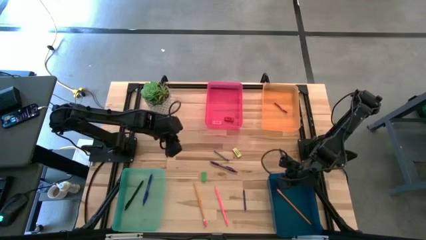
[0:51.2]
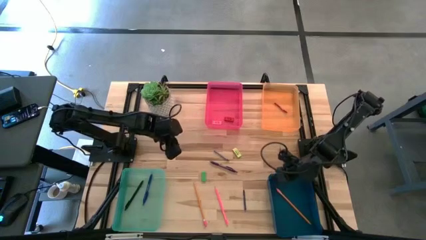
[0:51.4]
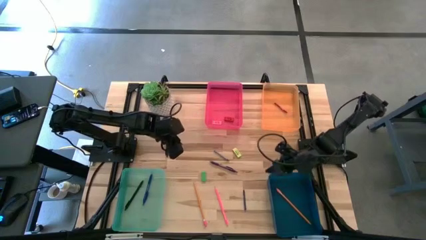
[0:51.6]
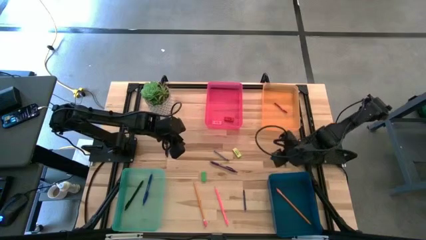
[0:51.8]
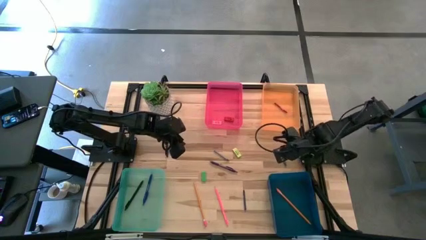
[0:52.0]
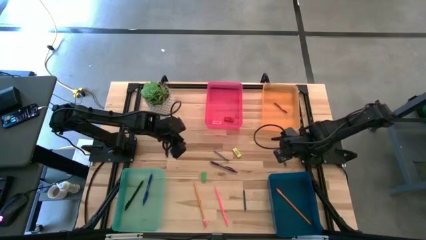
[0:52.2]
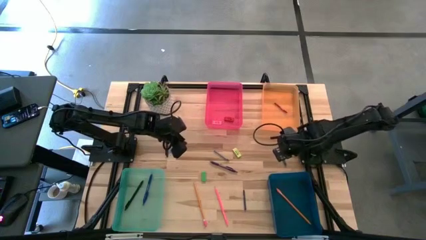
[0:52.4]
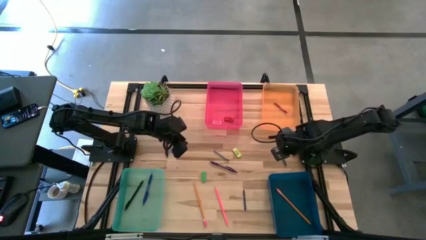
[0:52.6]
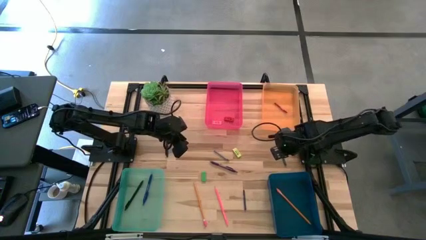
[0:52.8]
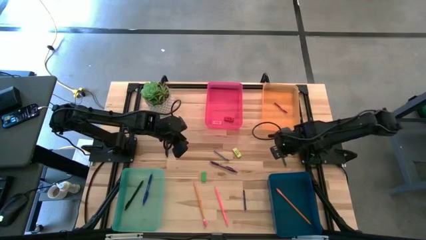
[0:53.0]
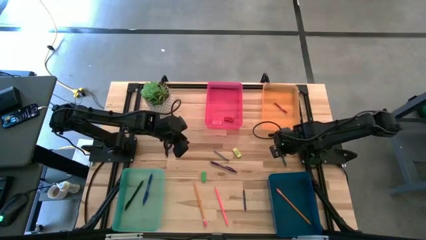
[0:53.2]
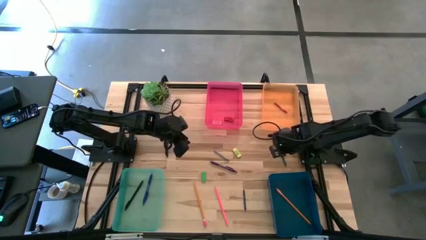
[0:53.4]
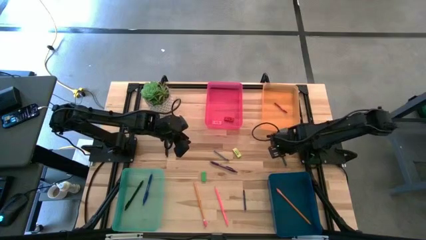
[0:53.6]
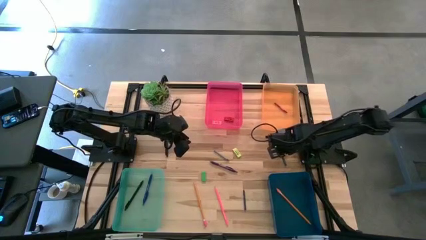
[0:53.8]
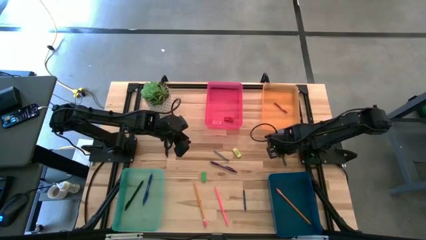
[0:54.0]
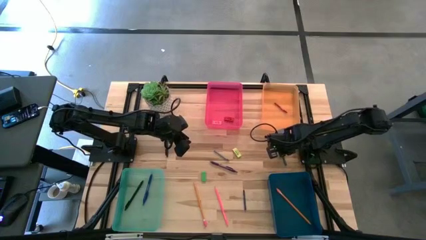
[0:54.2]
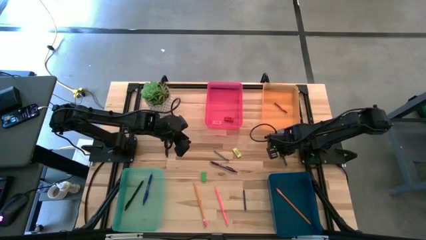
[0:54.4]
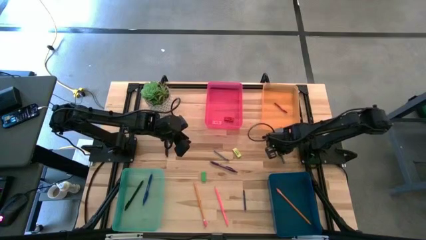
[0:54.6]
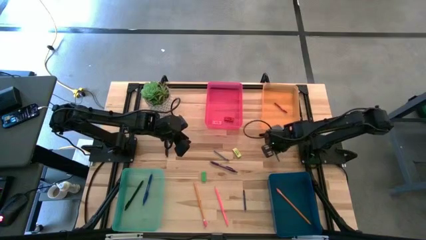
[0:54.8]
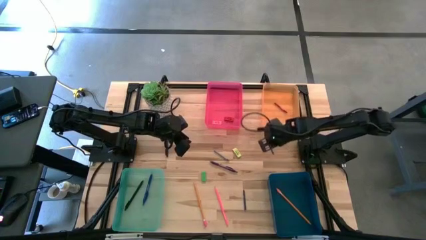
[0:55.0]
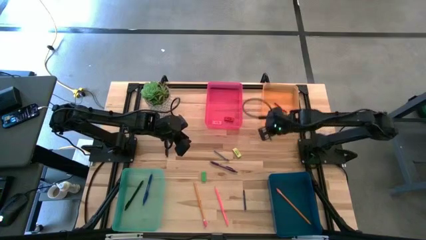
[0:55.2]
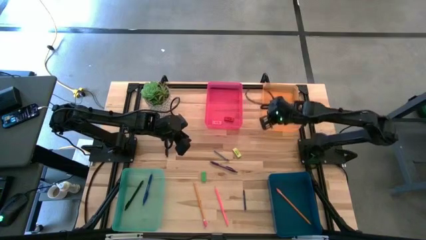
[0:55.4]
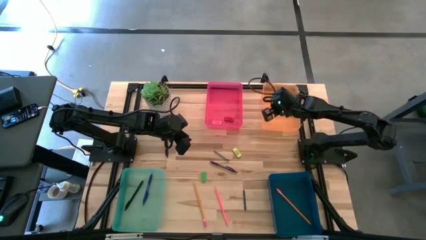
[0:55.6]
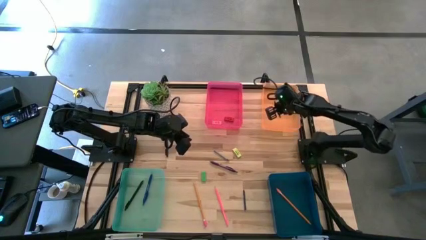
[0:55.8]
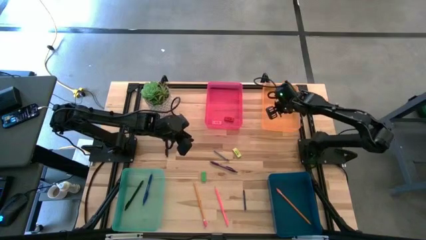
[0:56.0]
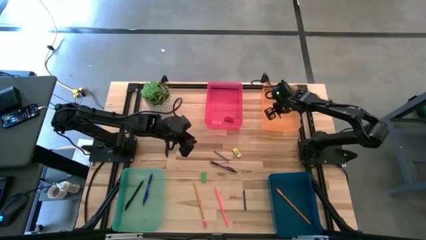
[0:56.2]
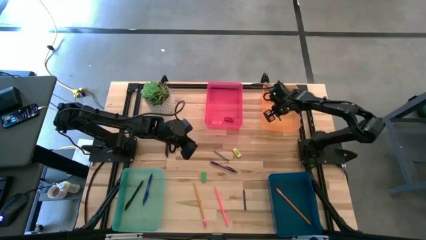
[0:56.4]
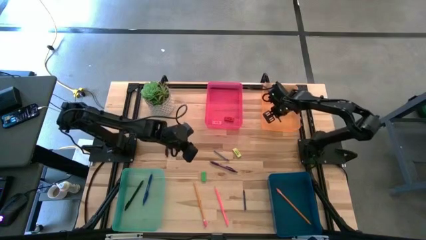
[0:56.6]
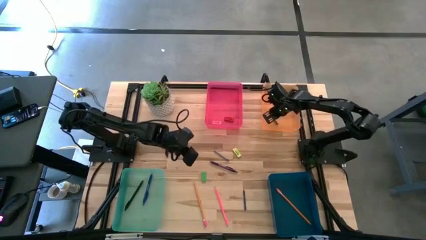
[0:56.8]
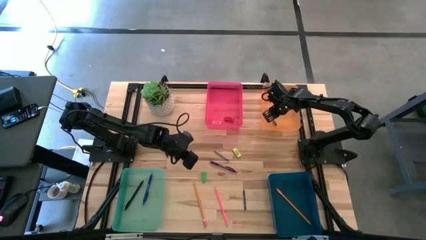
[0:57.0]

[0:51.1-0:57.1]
Task: Sort crayons/erasers/pens/pencils in bins
Put the green crayon into the orange bin

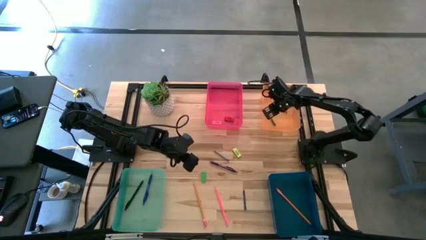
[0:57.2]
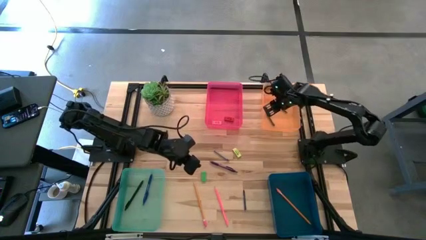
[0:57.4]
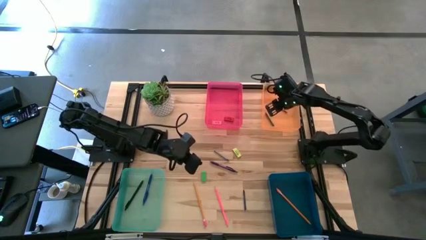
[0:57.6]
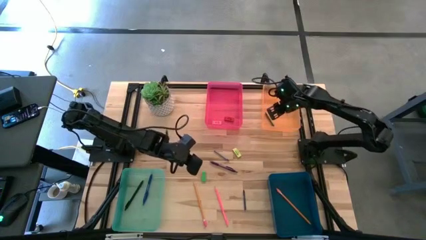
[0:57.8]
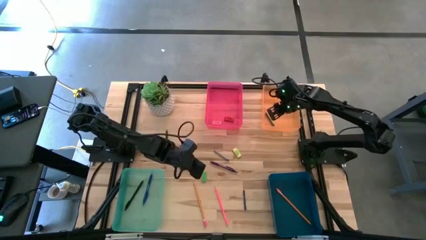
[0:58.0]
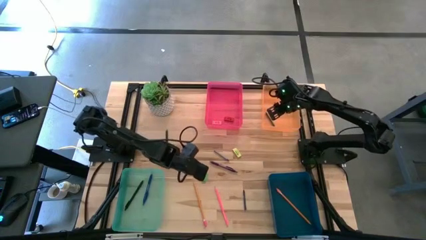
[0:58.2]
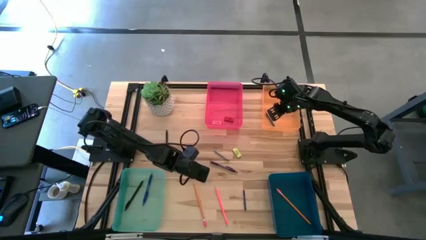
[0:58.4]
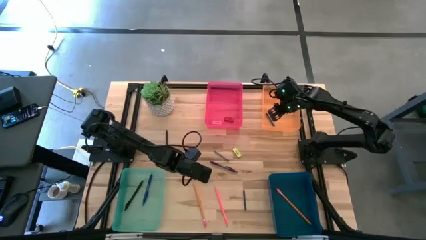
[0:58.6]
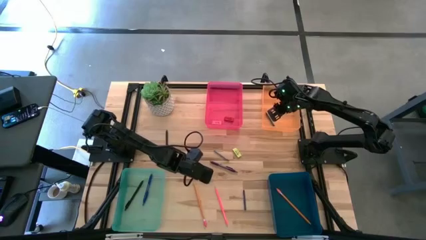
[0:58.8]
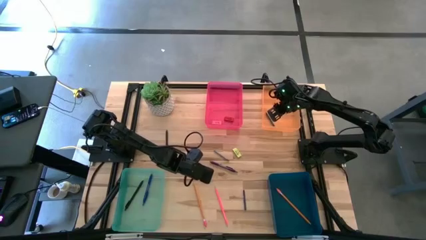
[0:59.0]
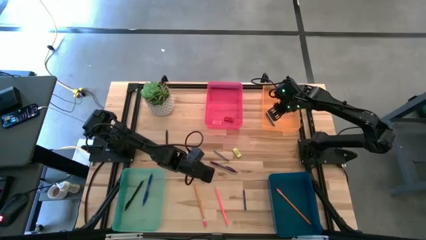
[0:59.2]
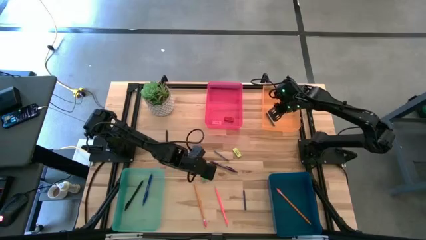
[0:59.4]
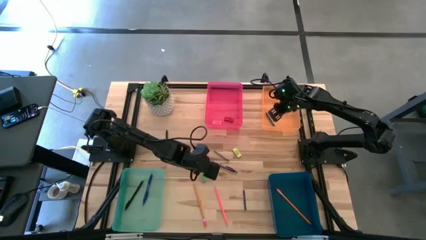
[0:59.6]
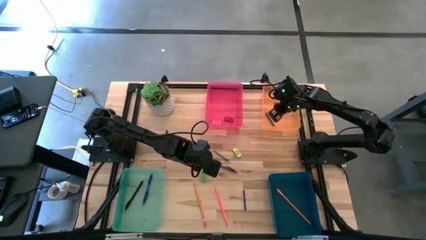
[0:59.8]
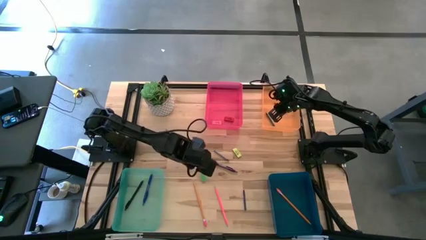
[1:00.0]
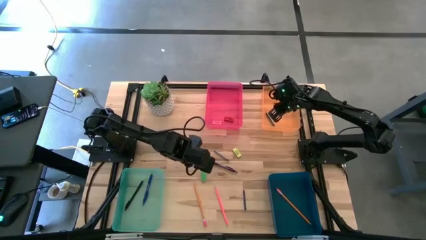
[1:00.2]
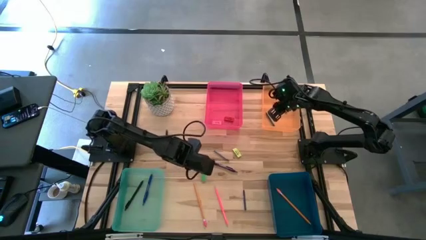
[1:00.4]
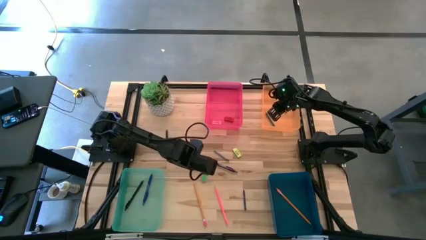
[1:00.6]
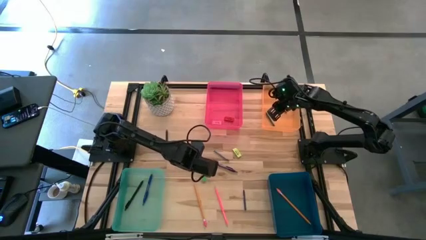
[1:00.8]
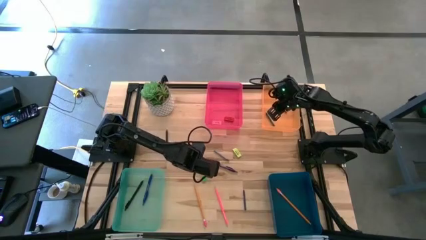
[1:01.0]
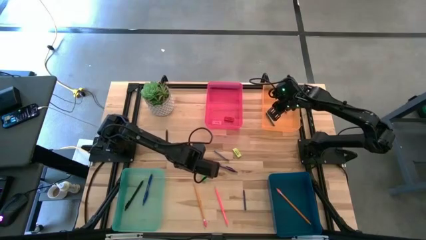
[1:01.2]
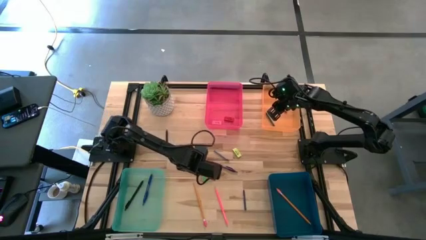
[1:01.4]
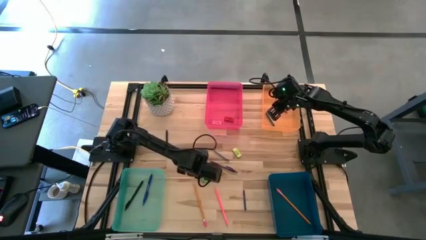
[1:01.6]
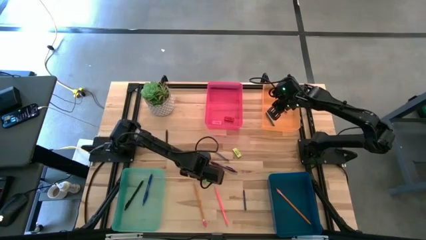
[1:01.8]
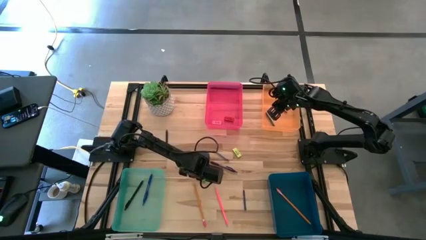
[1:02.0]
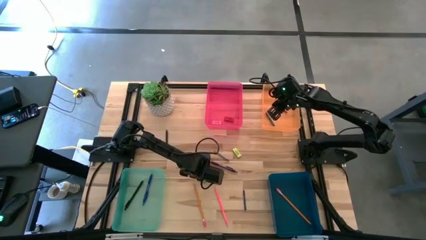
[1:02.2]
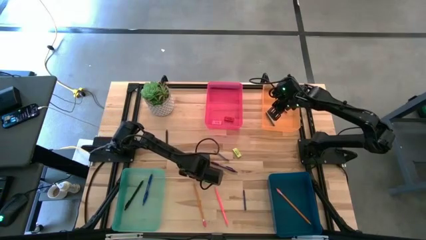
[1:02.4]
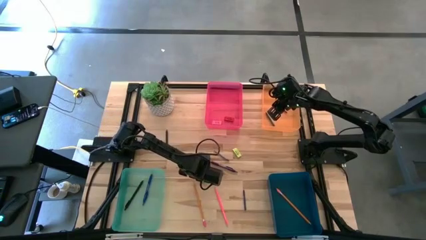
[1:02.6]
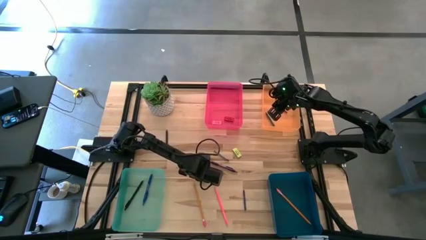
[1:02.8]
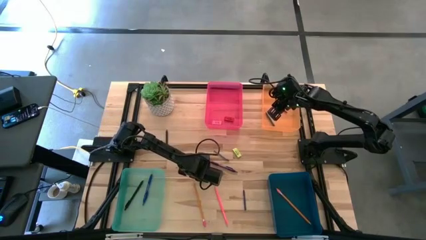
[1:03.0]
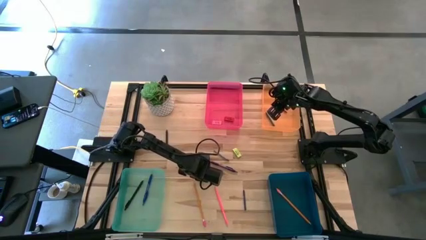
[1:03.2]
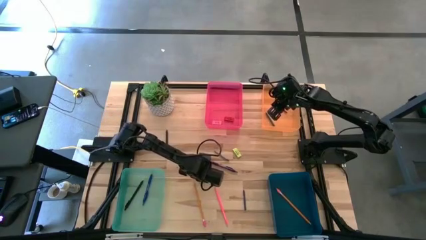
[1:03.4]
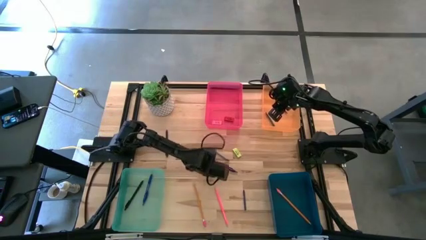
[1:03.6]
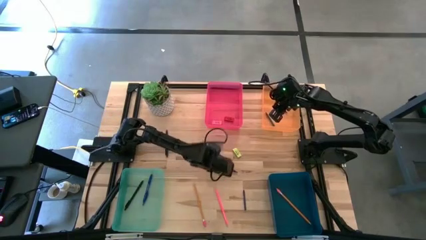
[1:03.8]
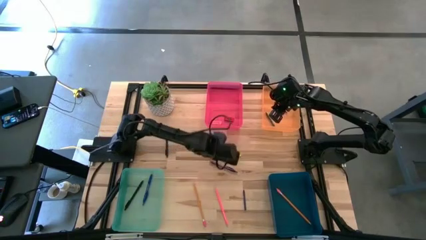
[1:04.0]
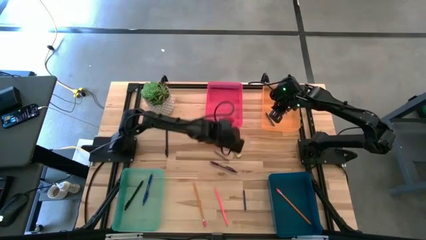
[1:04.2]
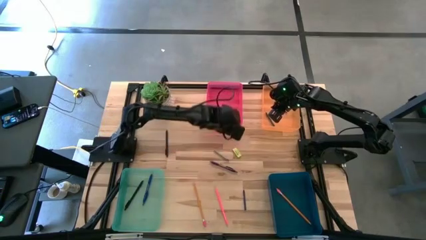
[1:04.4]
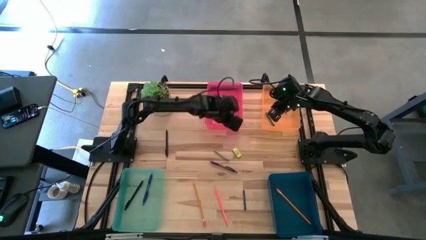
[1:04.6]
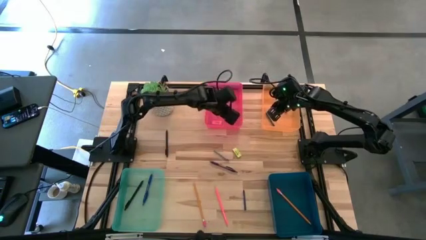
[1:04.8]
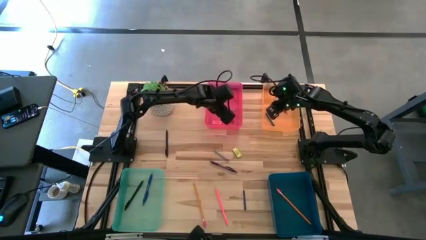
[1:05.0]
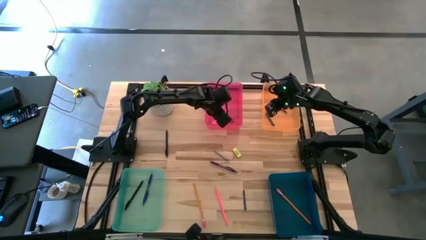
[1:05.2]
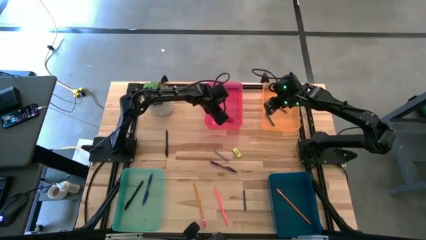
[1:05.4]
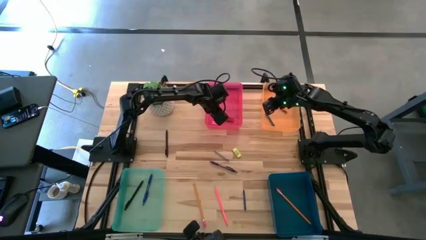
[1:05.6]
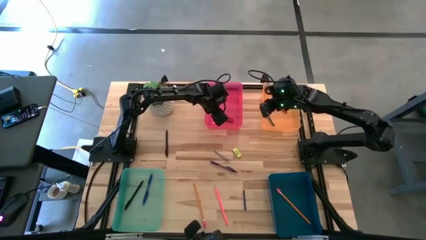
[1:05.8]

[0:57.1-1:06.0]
Put the green eraser into the pink bin

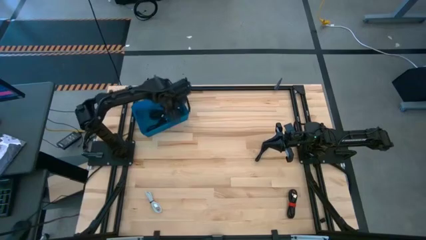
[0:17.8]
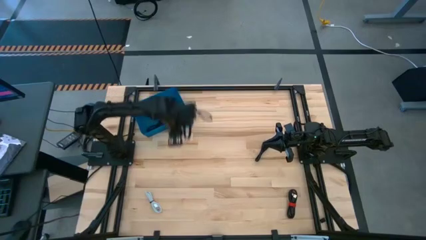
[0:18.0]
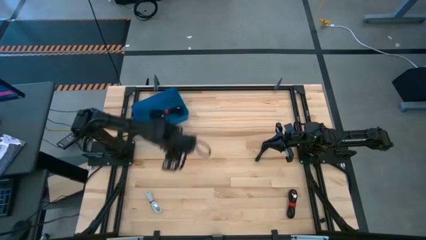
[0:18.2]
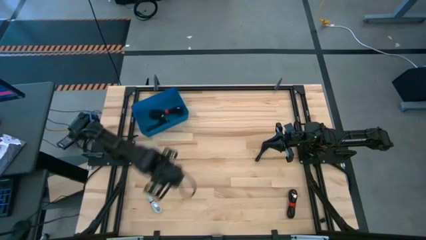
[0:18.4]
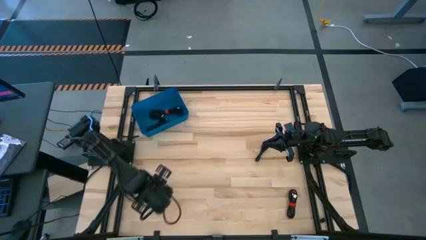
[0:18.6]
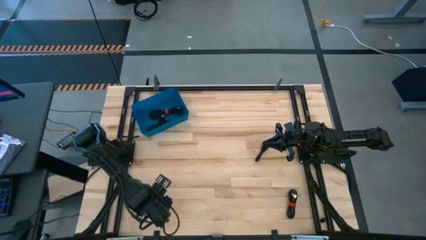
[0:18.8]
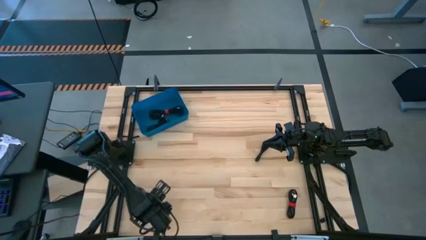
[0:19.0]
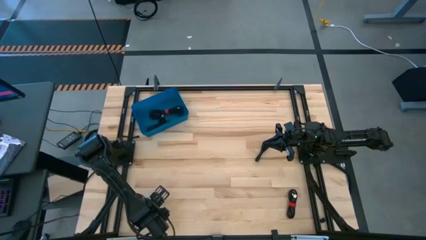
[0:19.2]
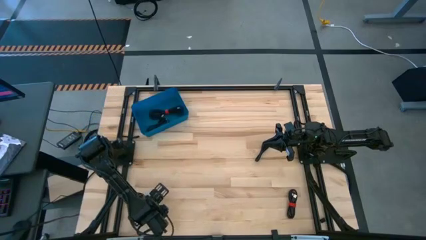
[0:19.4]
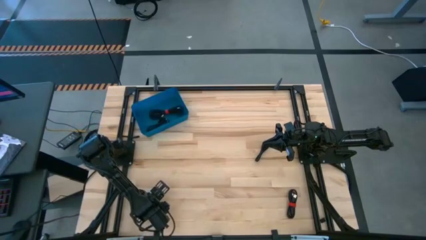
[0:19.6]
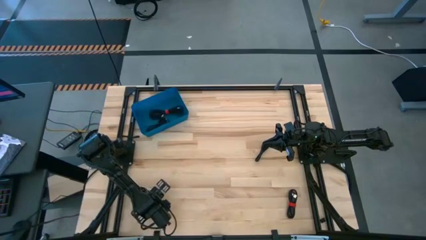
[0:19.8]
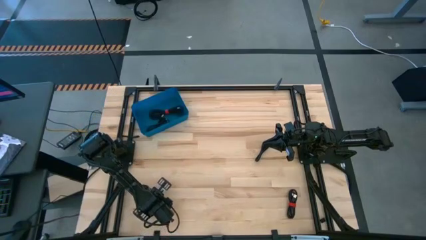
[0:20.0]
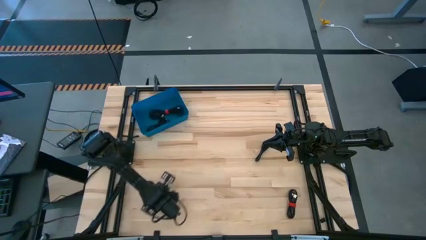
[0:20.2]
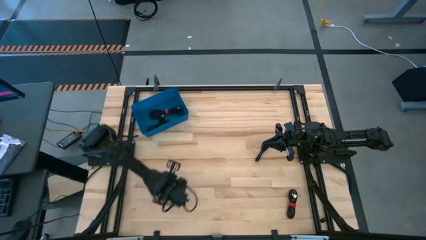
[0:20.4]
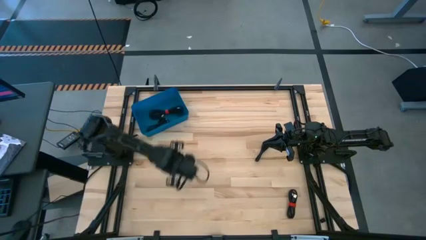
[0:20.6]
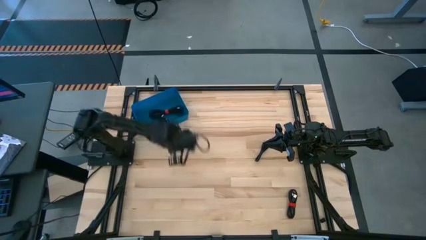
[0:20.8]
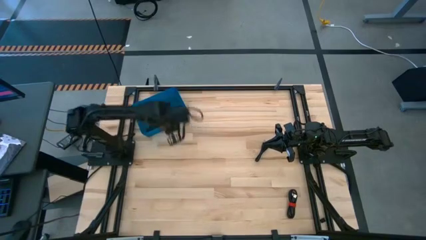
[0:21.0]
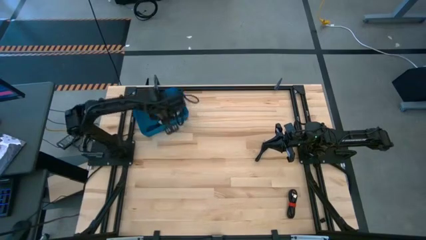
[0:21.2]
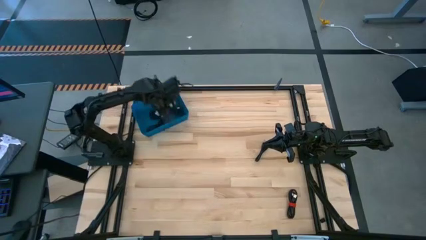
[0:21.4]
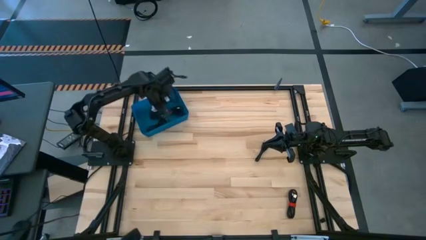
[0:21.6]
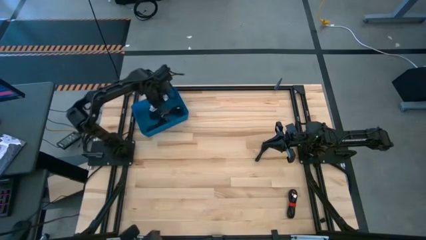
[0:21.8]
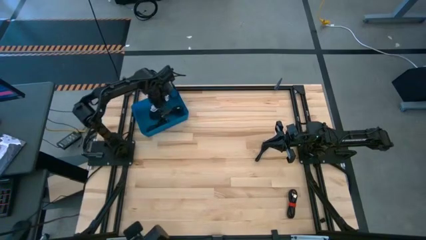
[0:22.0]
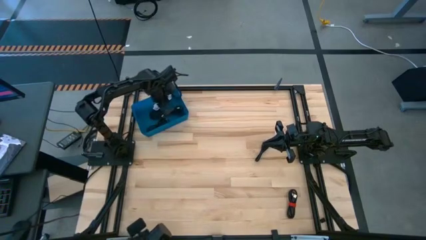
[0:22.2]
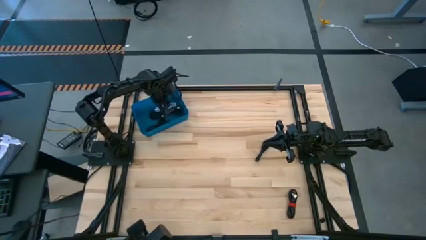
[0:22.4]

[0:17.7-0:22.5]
Task: Pick and place USB-C Cables
Put the white charger cable into the blue bin
